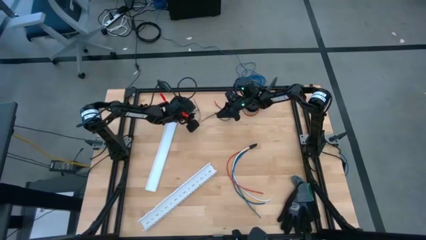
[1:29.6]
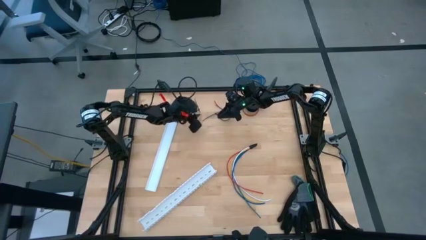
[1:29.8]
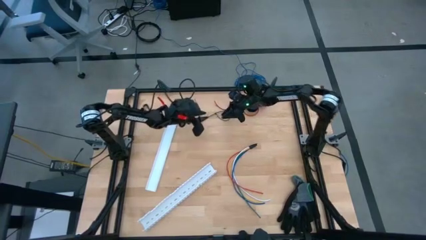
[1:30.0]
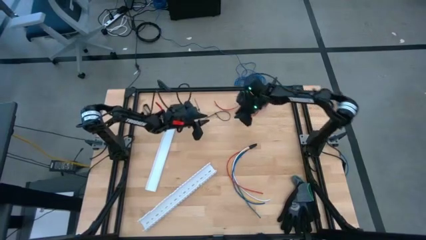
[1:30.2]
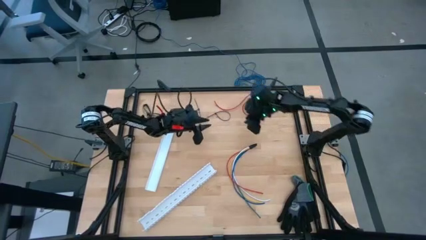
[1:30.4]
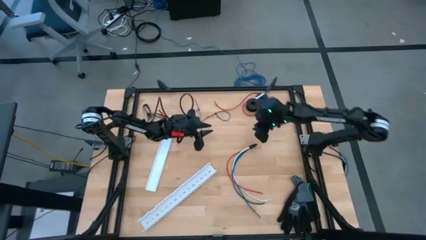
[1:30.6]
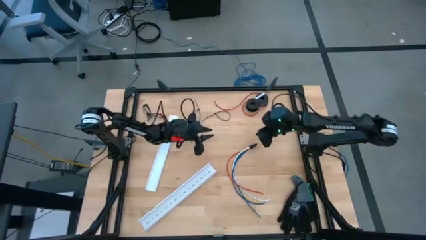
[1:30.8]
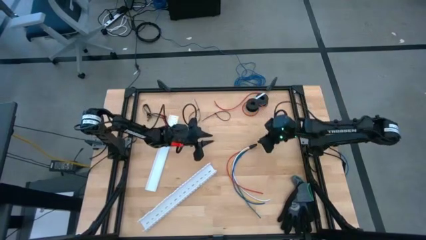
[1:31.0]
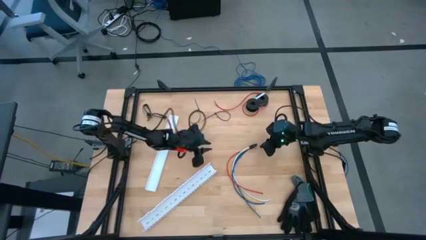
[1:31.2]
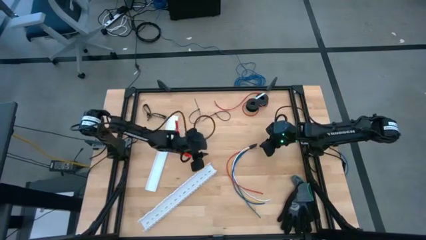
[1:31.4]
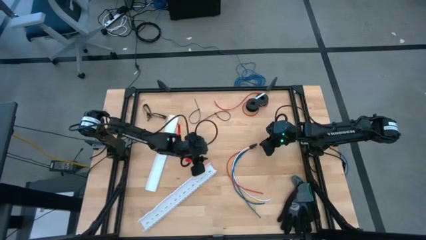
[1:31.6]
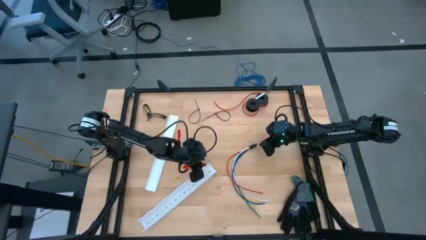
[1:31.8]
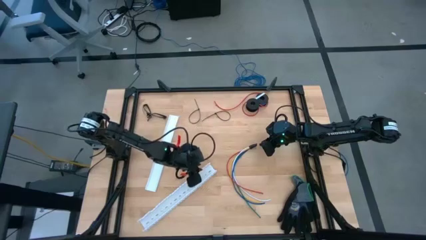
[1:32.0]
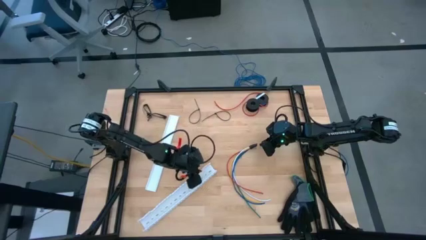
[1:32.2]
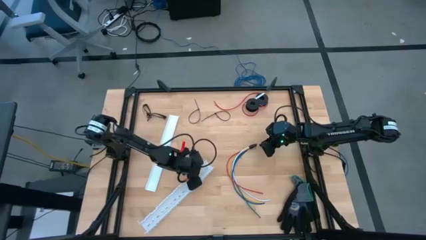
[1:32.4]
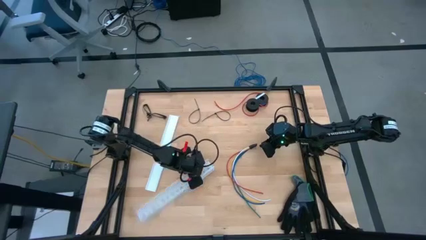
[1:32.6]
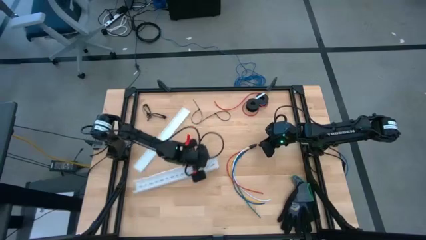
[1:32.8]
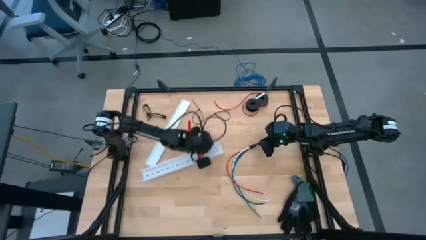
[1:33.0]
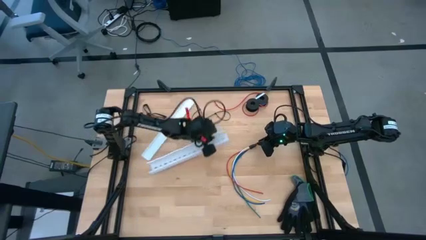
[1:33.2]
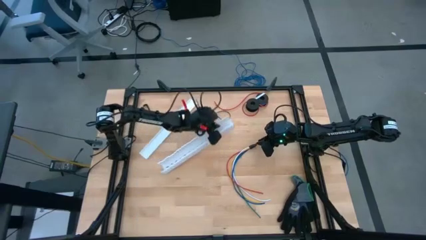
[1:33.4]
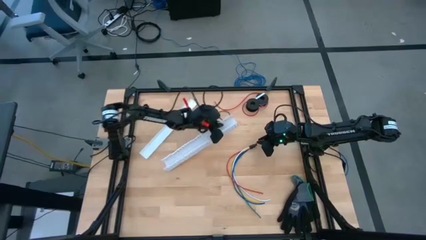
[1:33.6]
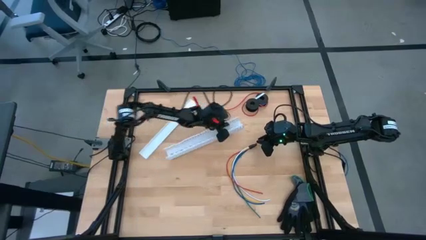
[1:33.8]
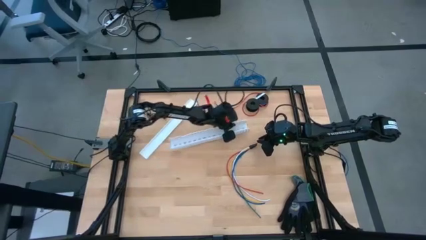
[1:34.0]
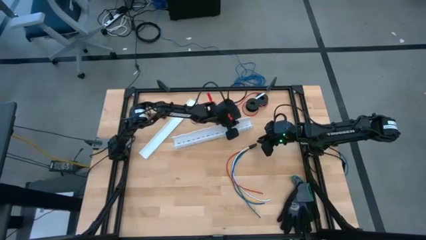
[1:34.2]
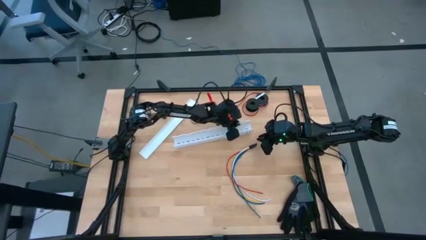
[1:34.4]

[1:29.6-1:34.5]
Task: Ziptie cables
Move the cable duct to the middle of the table

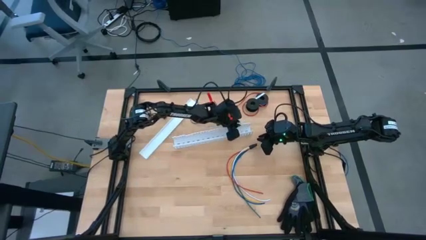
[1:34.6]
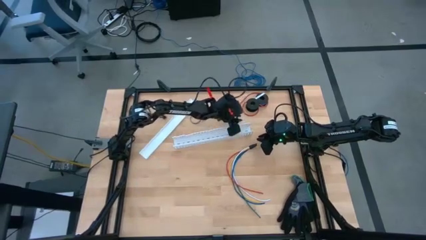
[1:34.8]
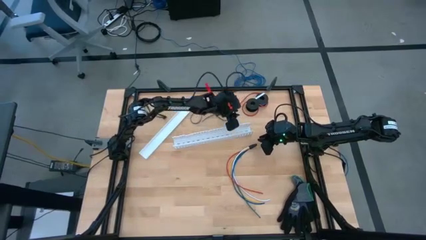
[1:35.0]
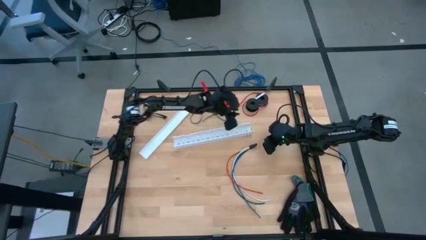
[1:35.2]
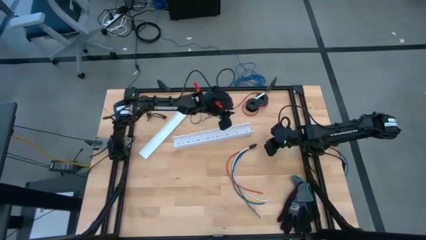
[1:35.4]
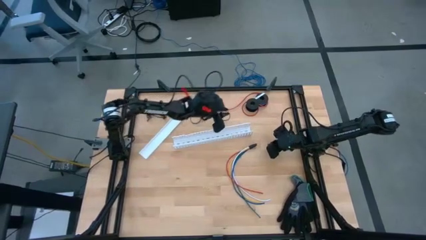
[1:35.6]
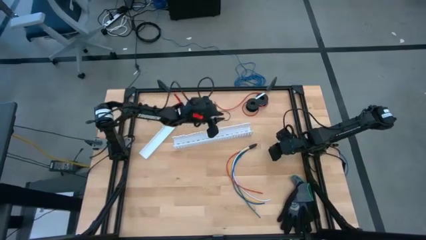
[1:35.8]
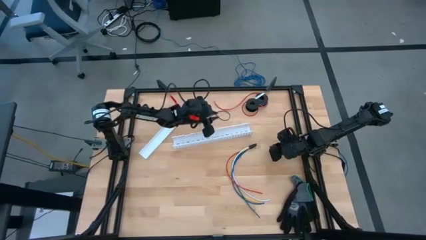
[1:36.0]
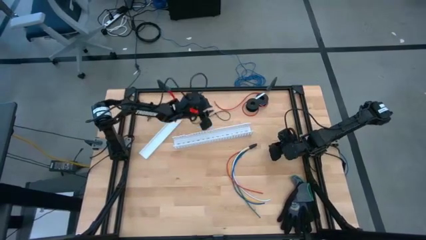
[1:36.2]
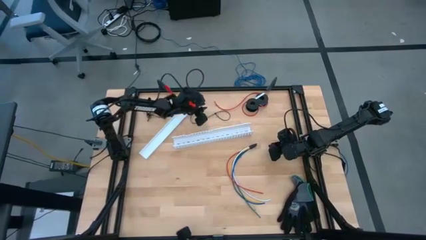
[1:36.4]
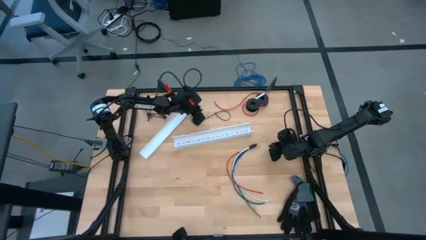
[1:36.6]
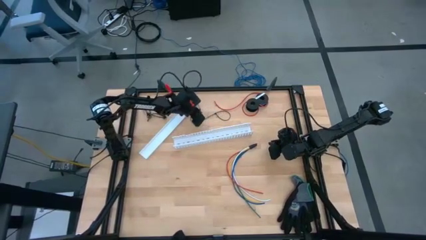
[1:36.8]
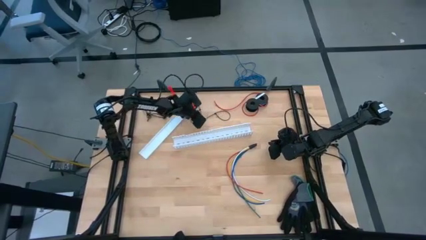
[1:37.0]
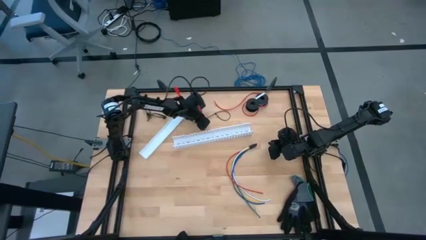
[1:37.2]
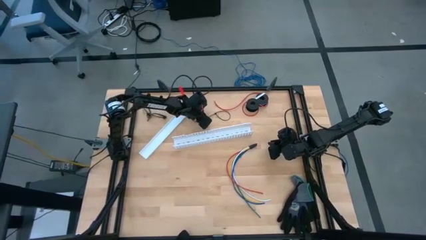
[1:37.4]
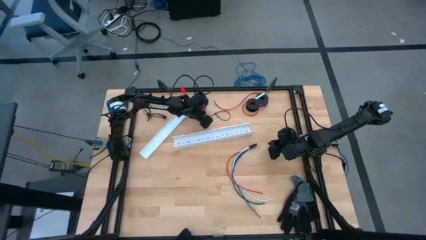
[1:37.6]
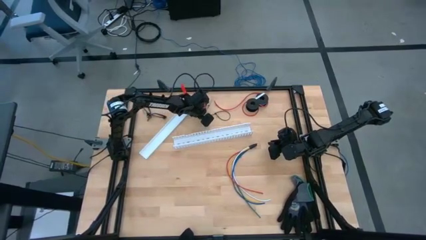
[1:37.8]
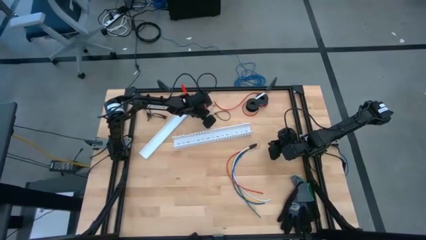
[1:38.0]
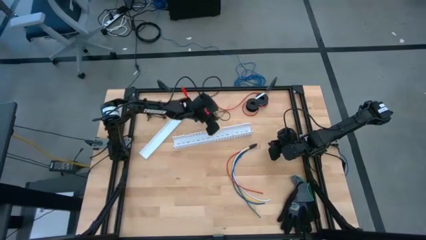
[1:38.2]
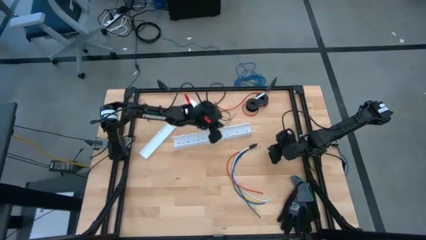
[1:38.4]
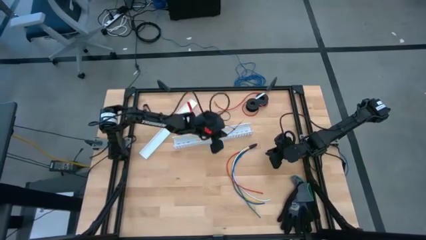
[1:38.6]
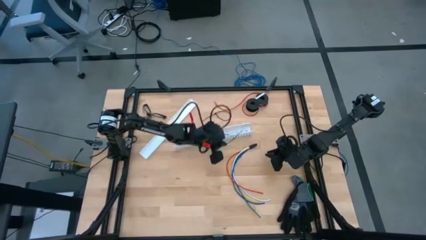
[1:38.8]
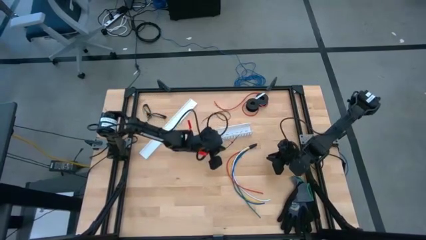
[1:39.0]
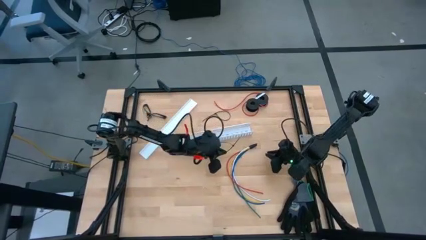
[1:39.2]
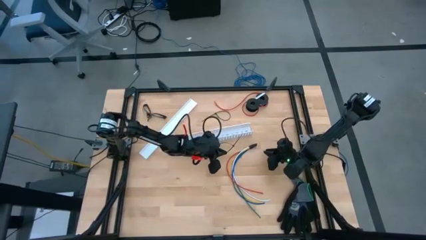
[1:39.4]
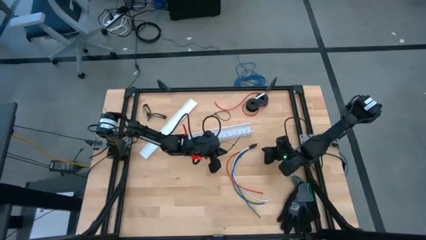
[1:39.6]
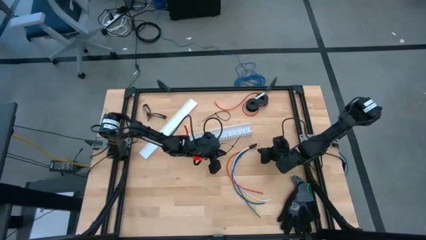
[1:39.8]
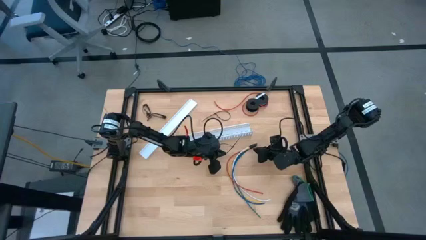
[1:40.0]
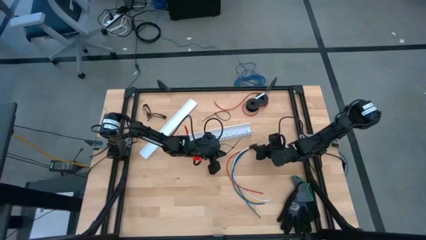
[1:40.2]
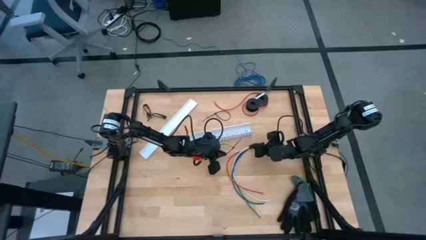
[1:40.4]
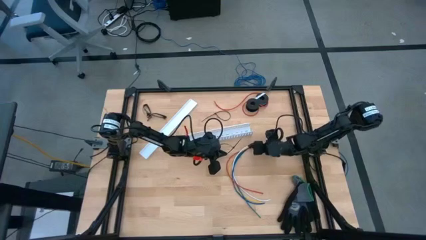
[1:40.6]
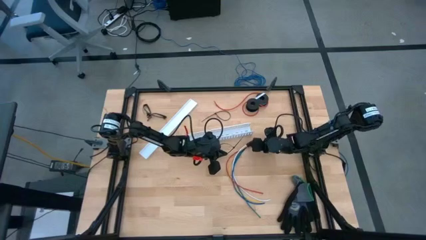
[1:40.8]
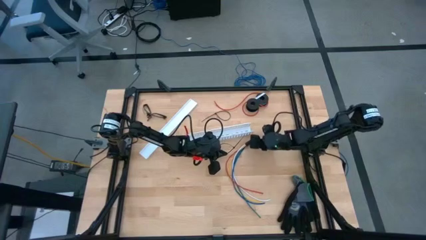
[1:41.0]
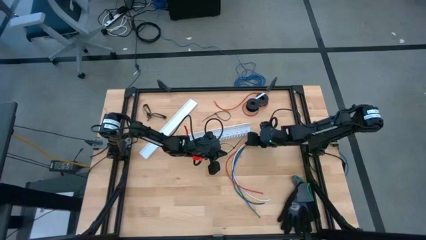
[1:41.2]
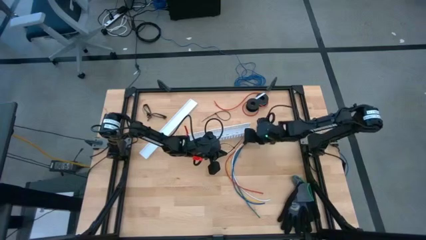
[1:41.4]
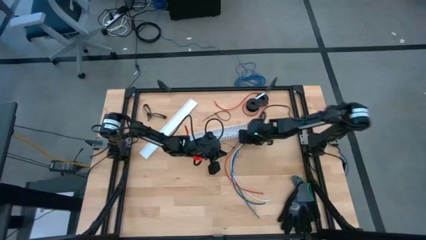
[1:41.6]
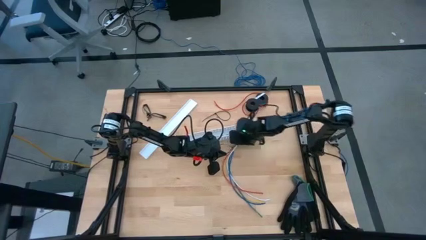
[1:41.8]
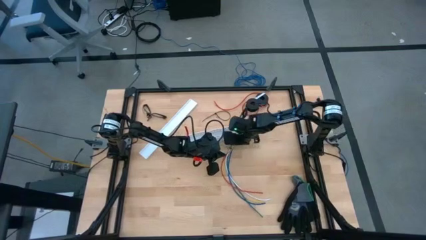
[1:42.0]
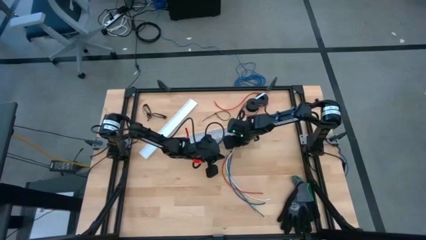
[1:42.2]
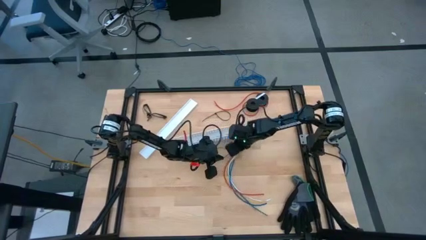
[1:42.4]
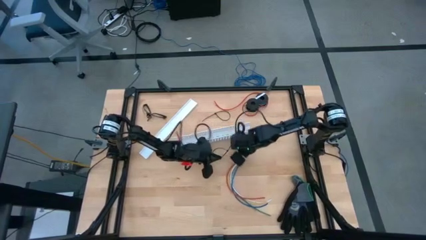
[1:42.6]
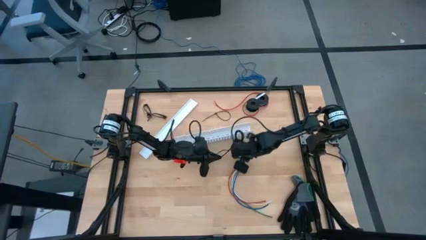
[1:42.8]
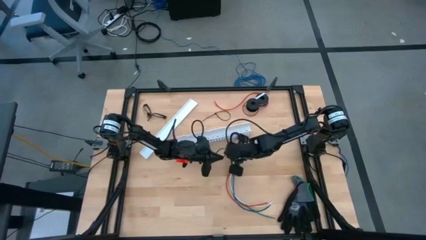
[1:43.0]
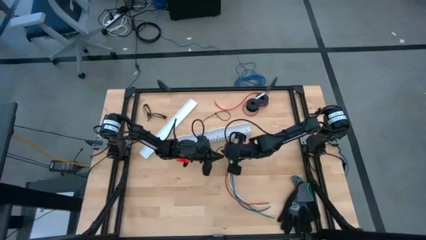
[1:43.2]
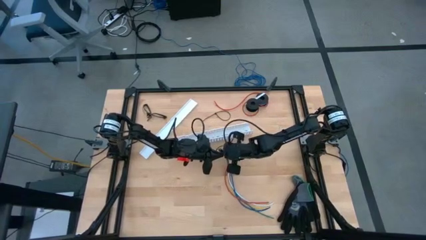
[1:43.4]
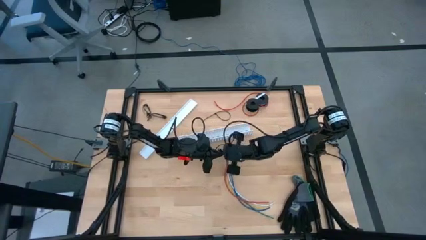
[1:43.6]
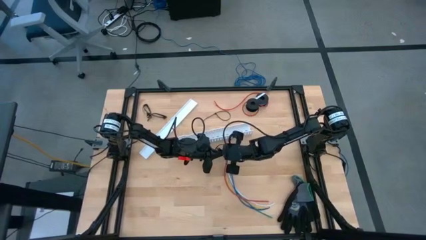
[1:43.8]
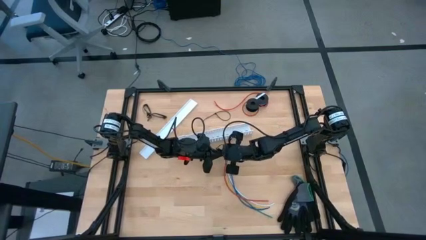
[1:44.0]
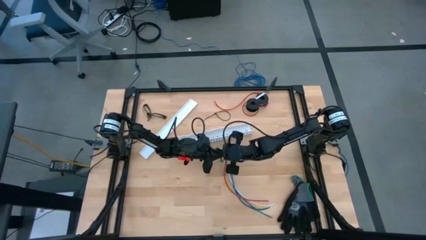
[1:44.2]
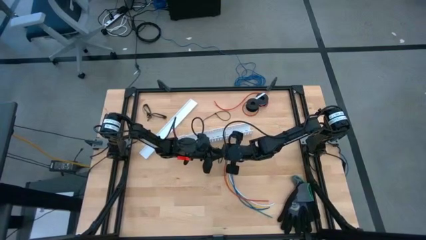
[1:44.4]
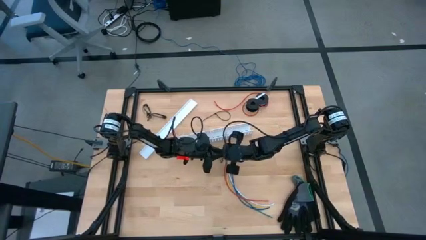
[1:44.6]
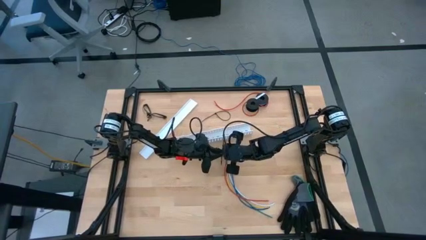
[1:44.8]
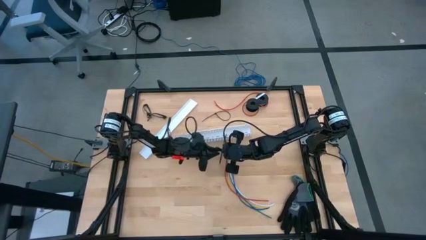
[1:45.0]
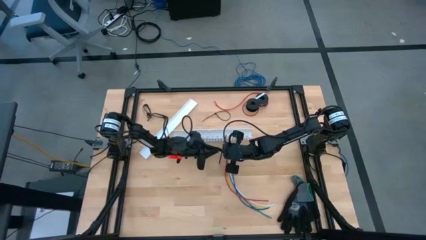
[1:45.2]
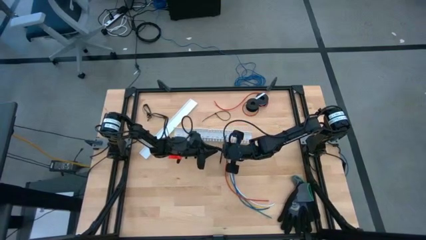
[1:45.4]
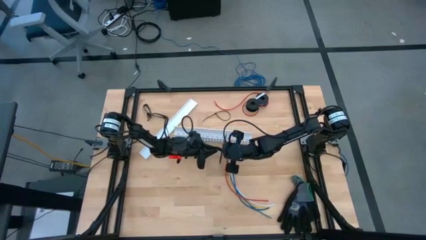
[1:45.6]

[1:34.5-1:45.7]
Wrap the cables together using the left black zip tie
